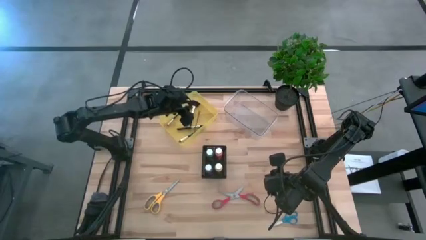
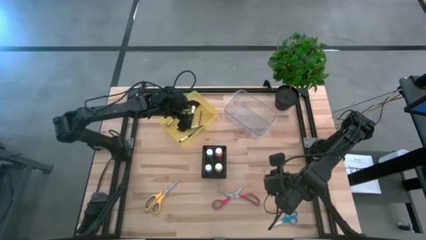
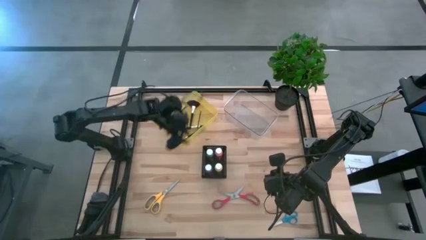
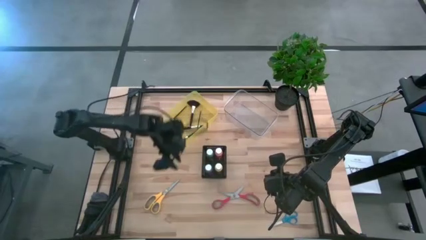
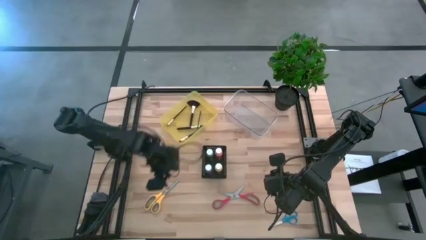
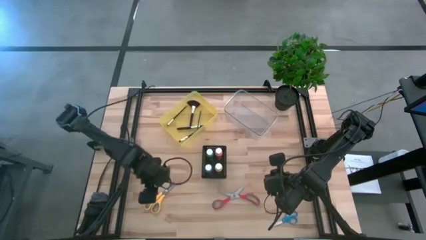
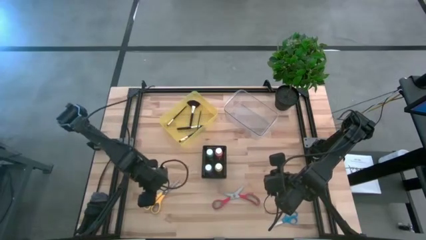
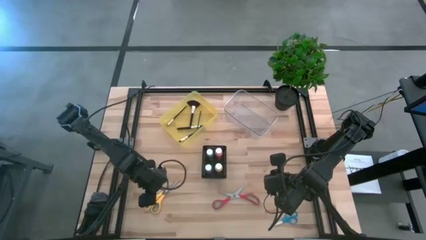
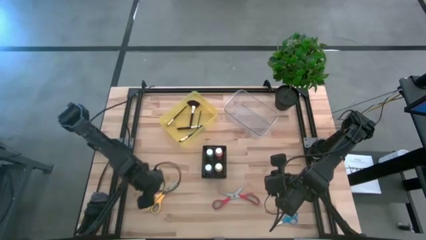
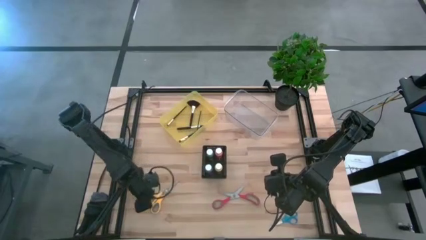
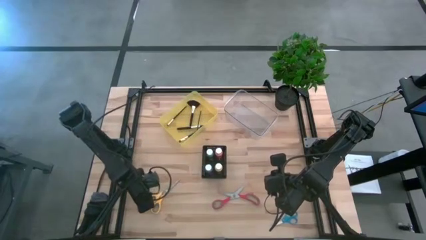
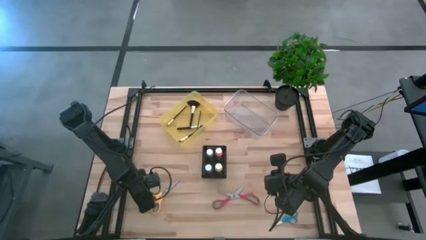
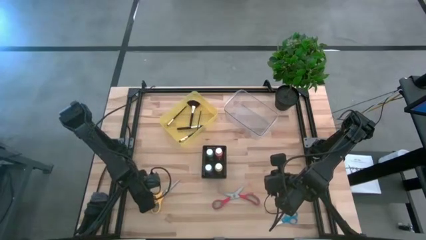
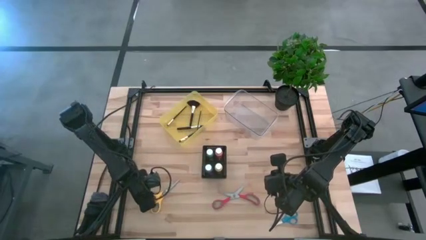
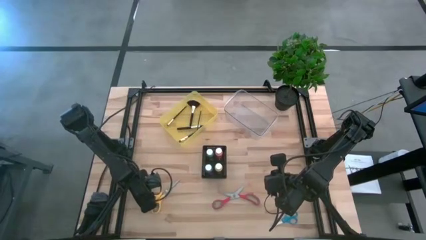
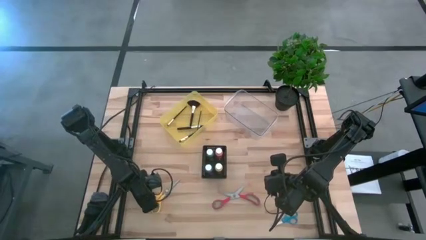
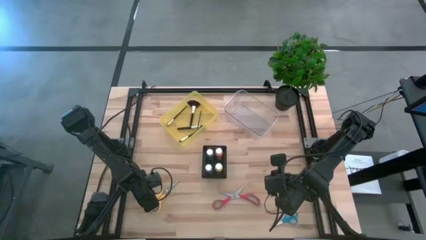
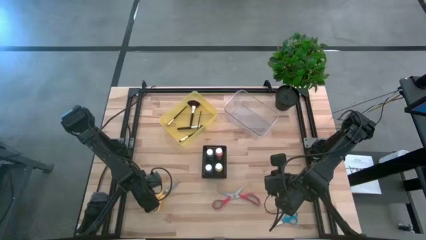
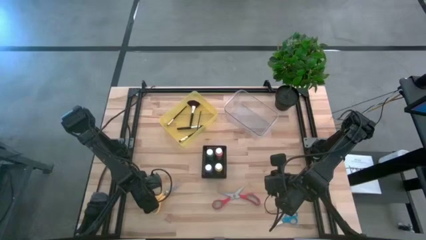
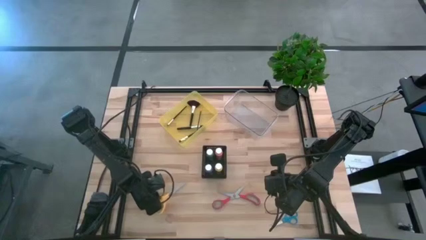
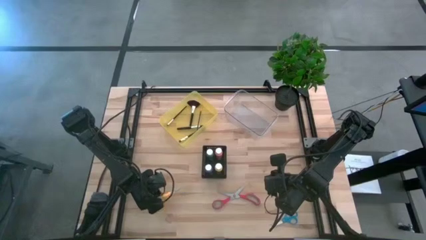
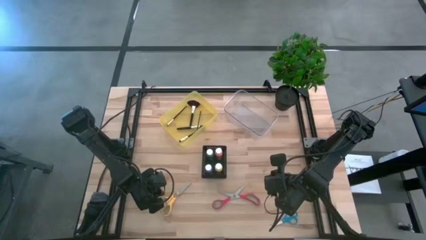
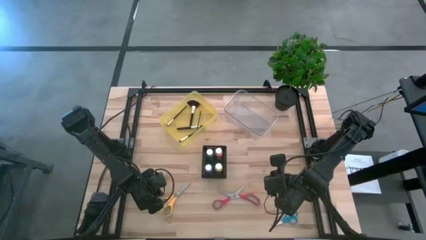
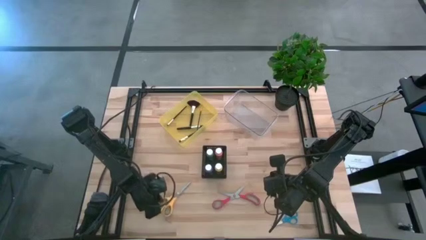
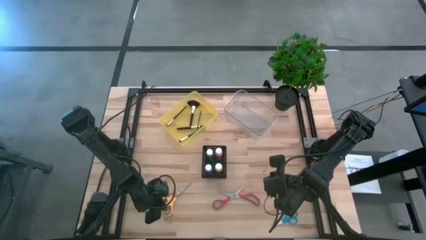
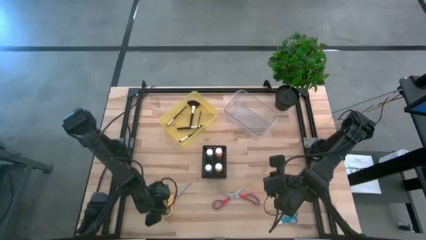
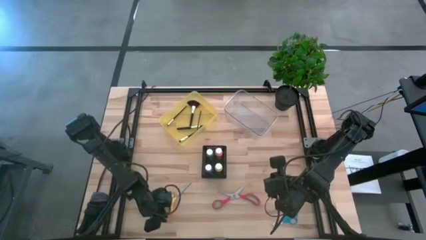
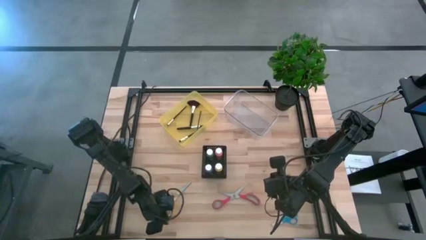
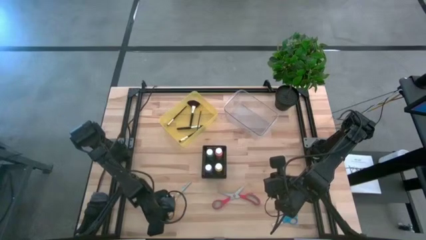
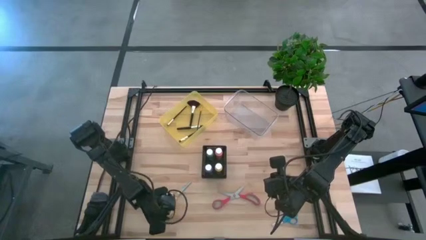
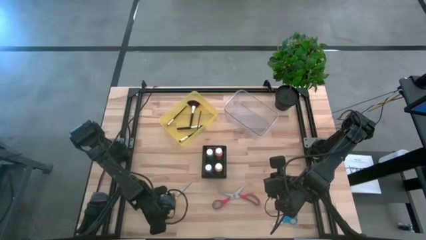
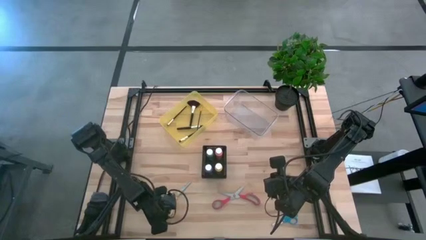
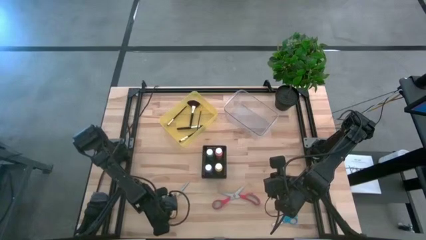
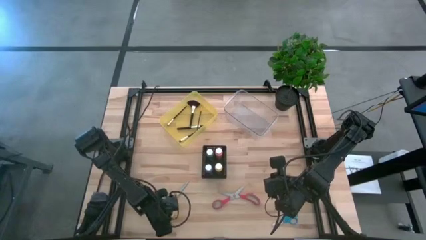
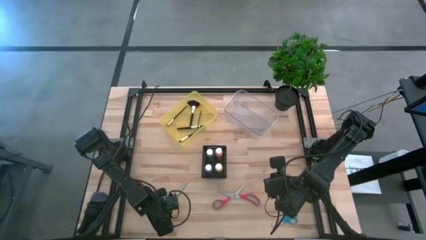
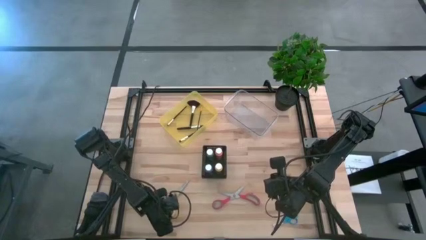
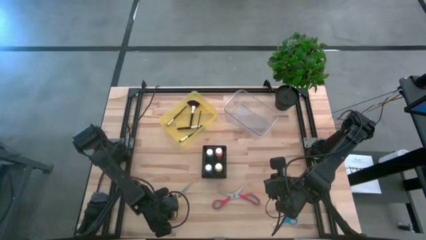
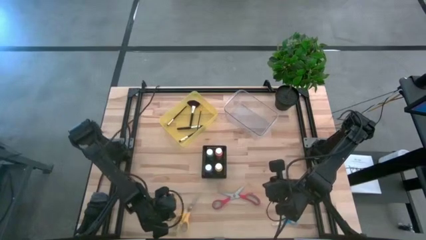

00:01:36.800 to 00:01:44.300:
Task: Pick & Place Paint Supplies
Put the yellow scissors into the transparent bin
